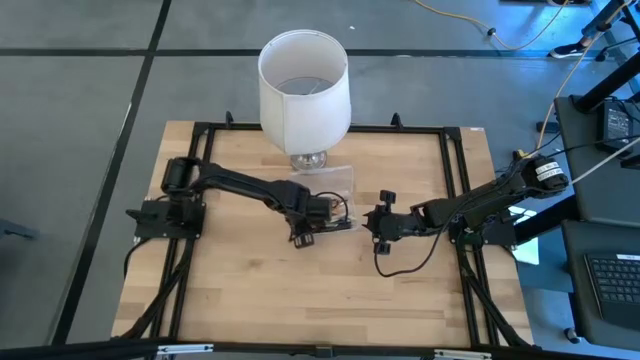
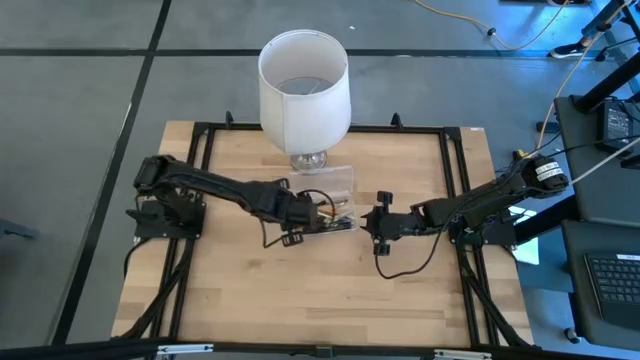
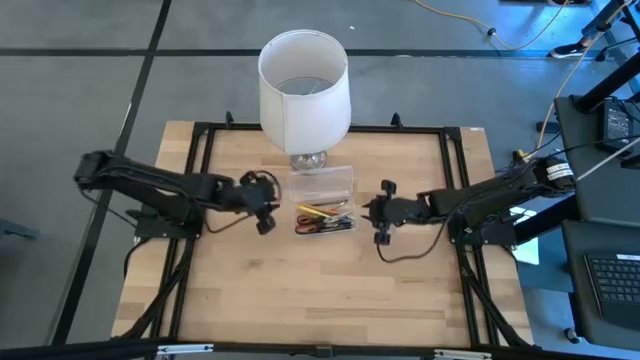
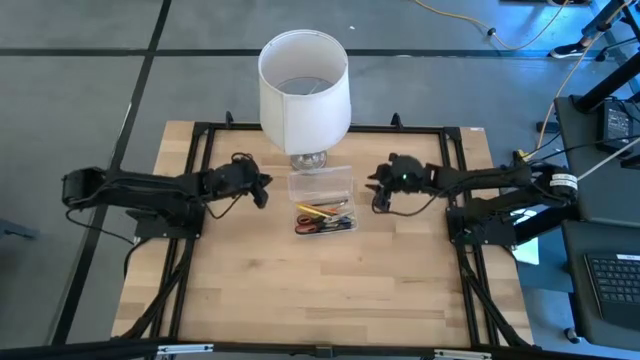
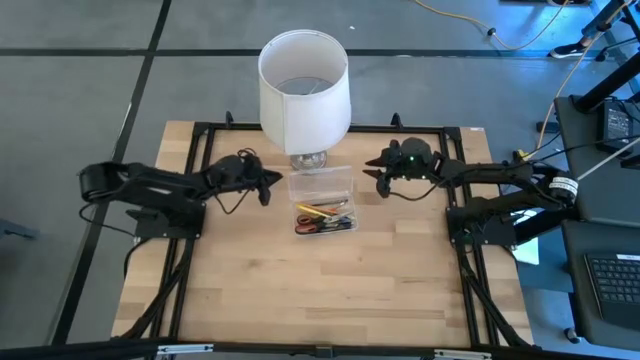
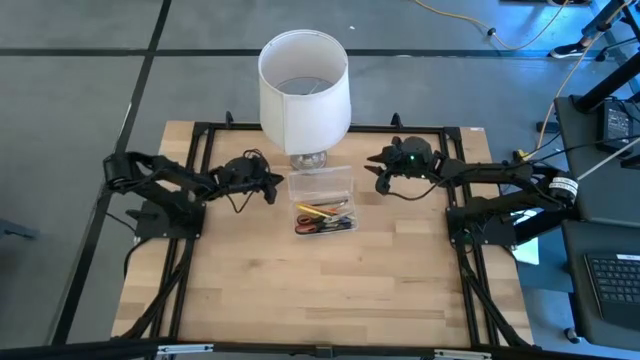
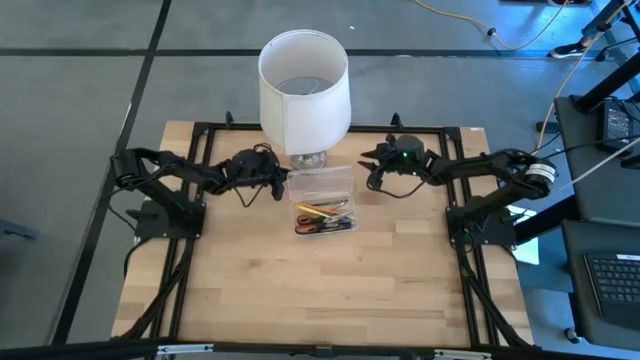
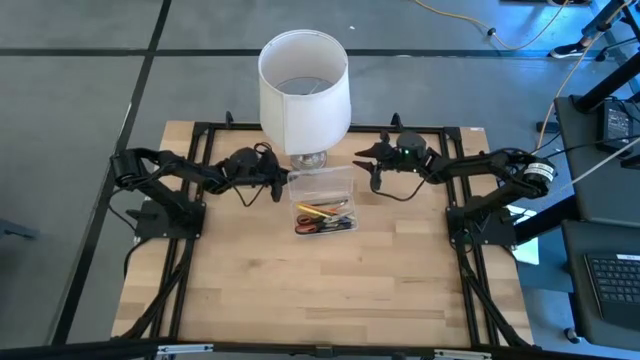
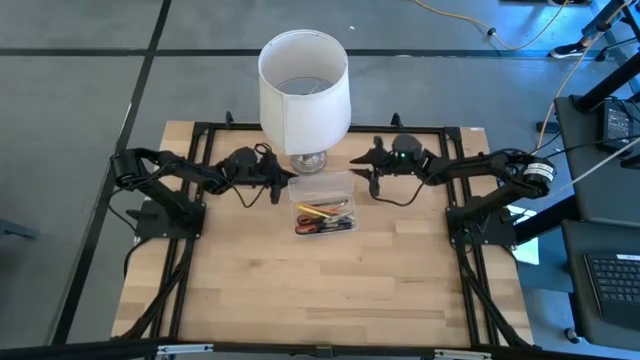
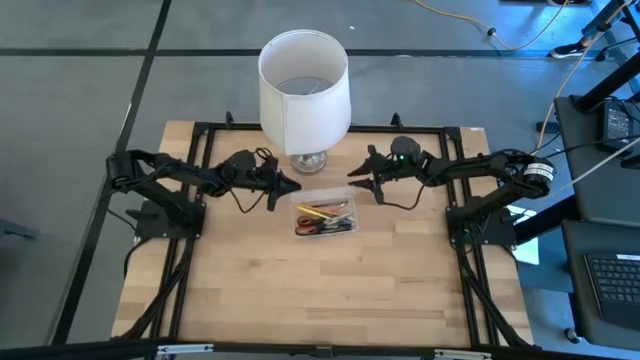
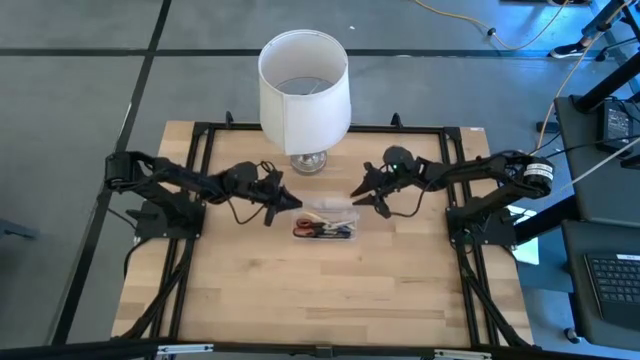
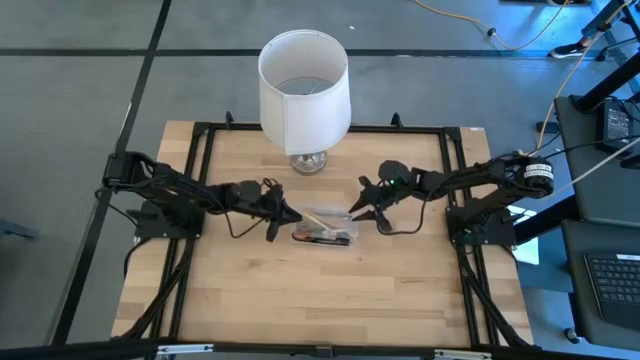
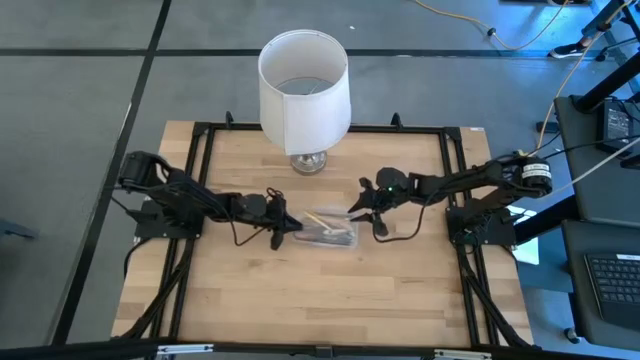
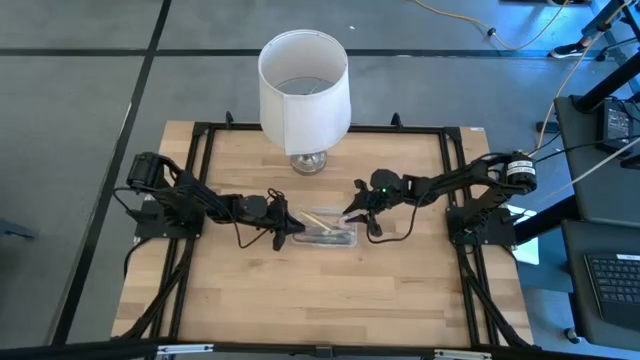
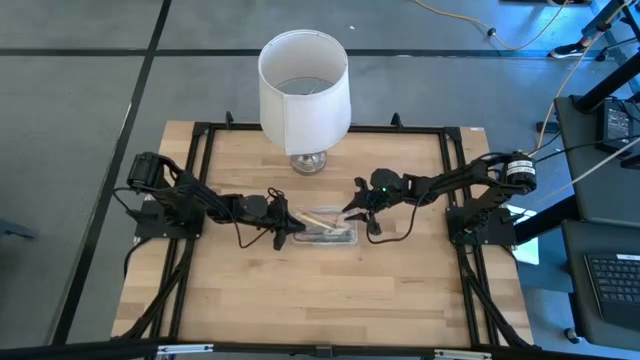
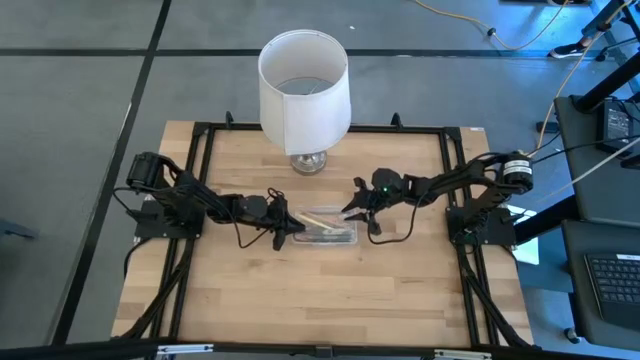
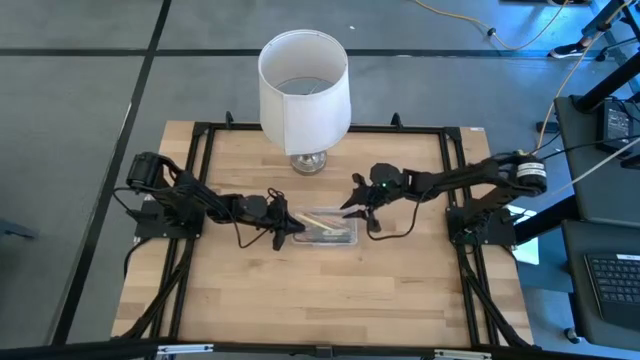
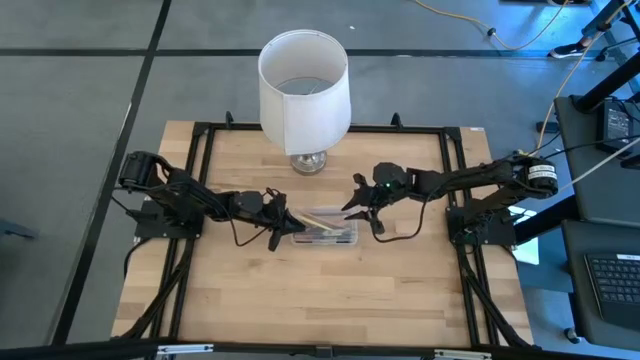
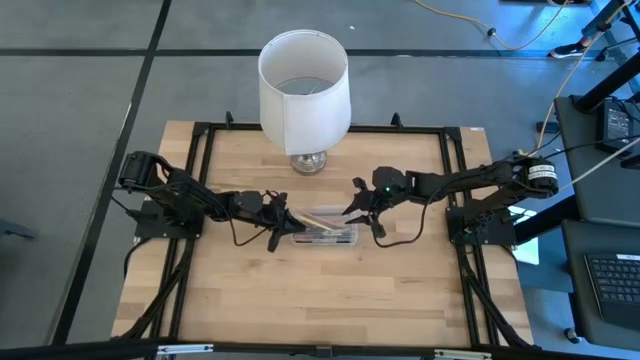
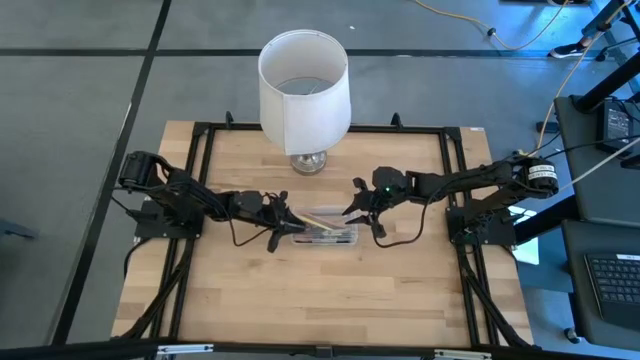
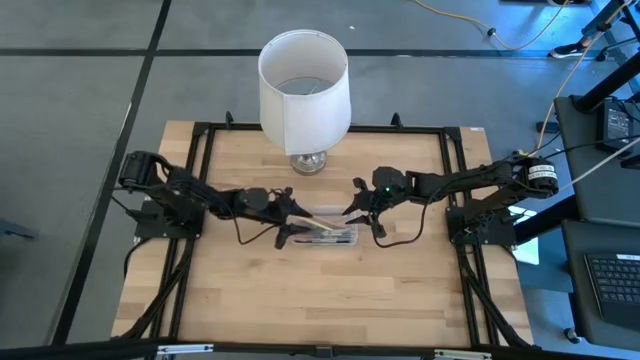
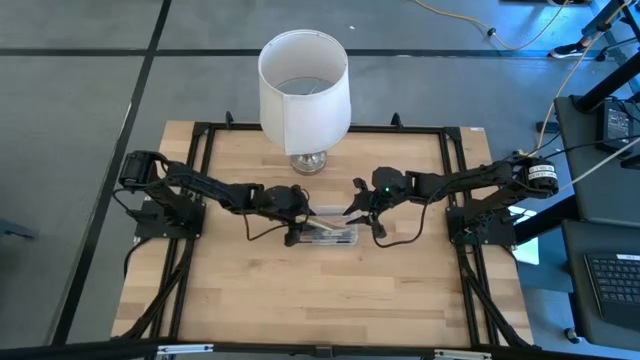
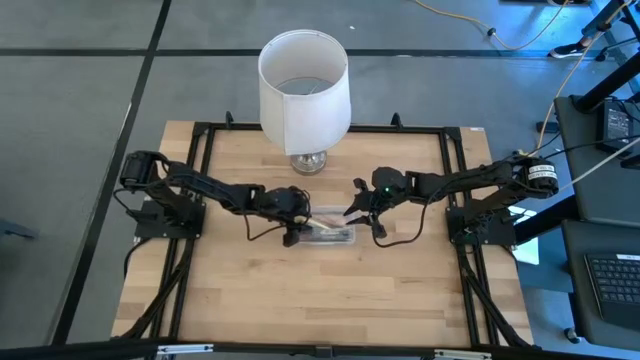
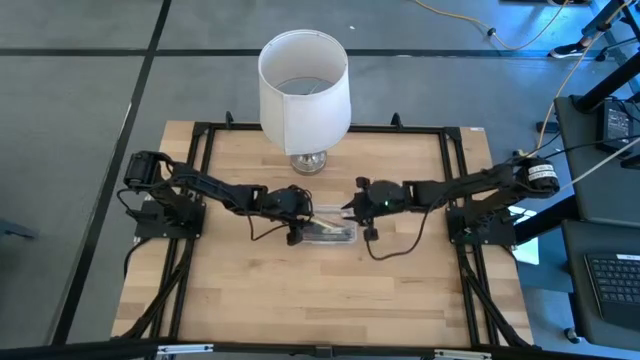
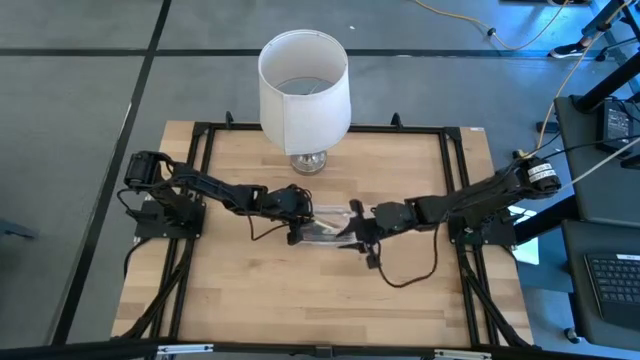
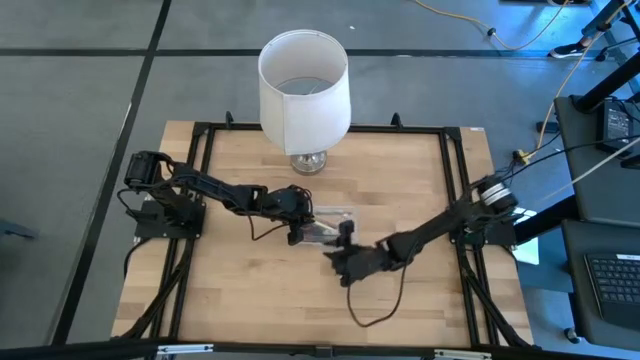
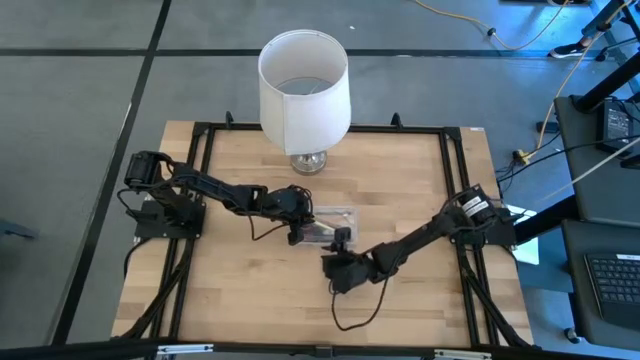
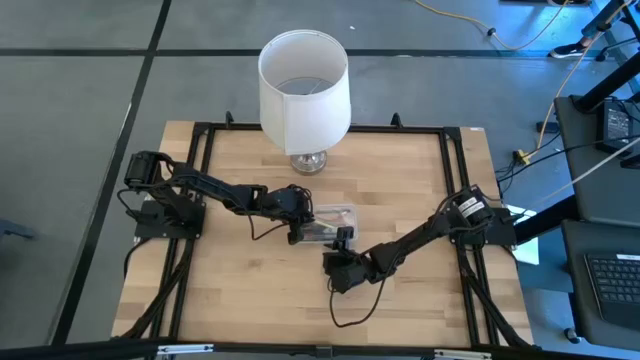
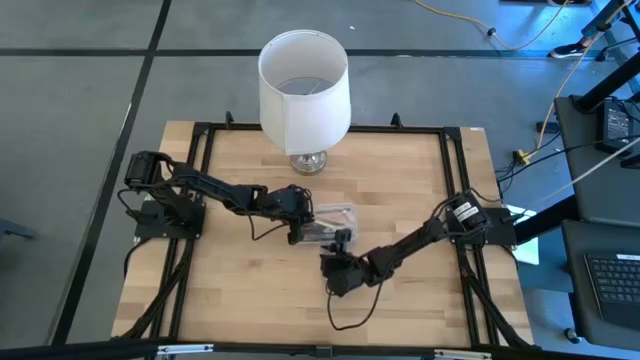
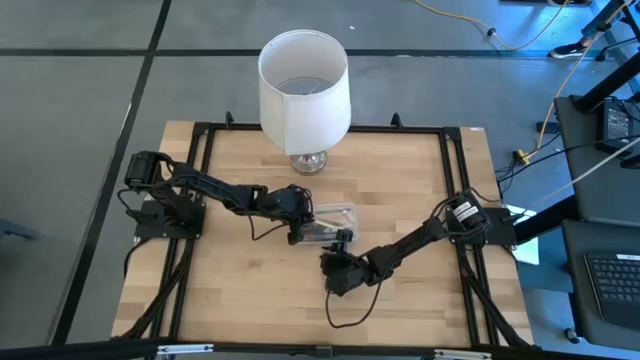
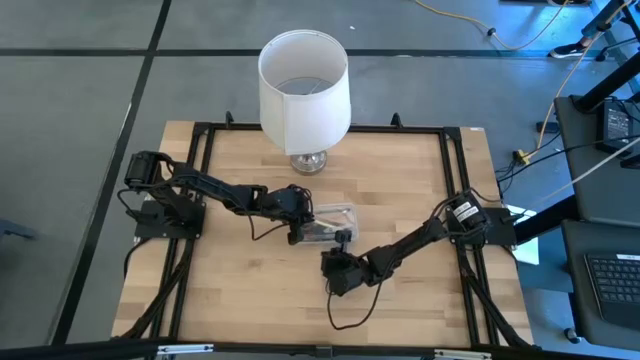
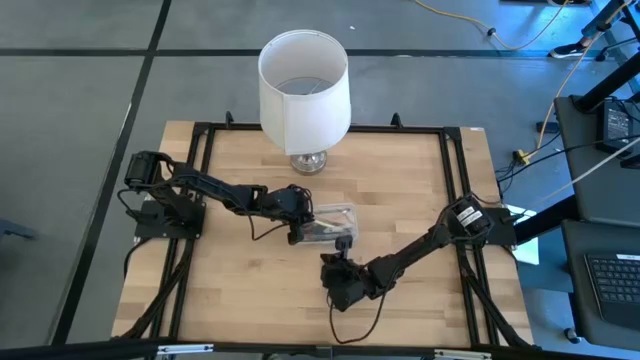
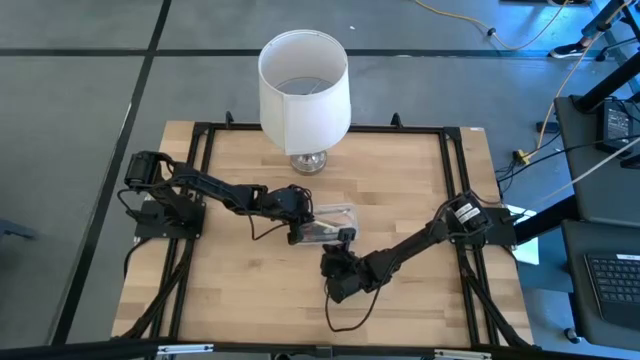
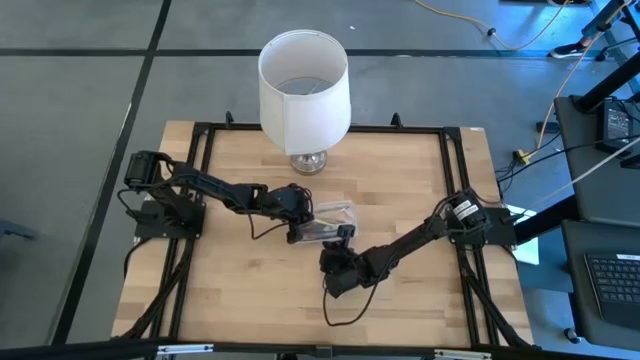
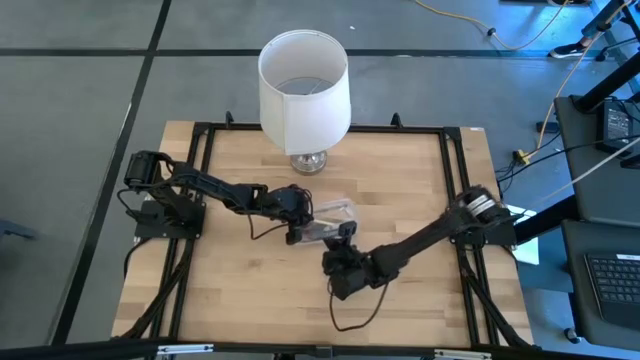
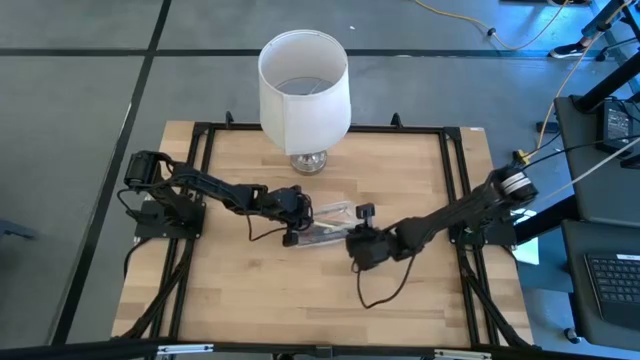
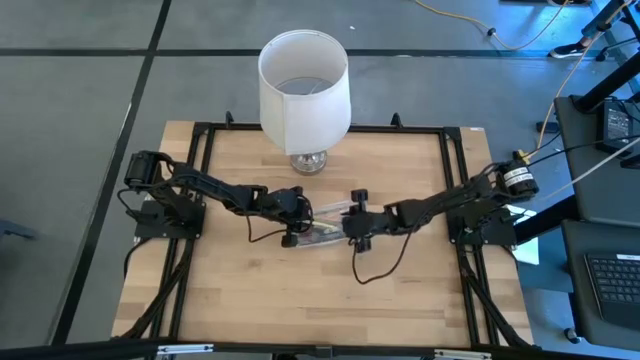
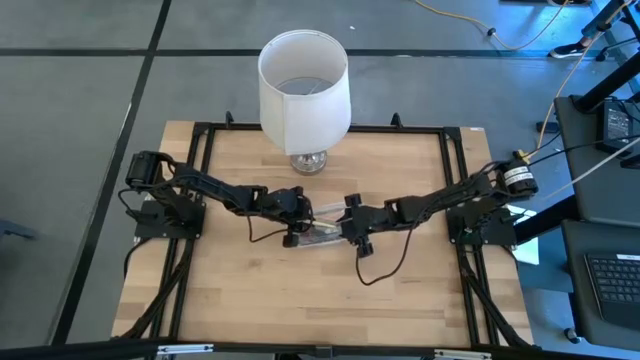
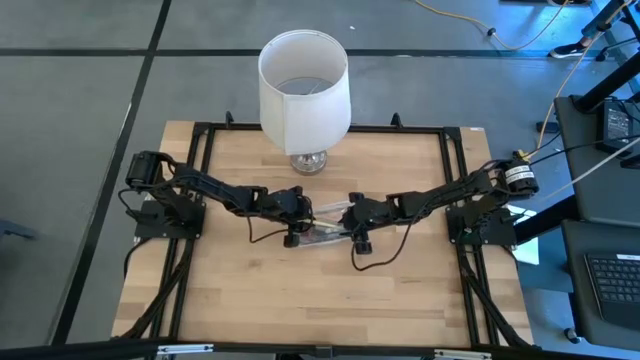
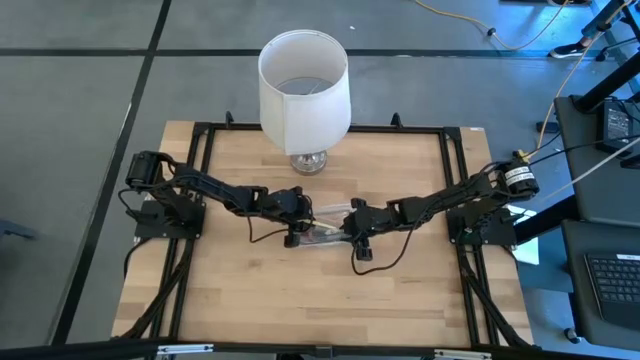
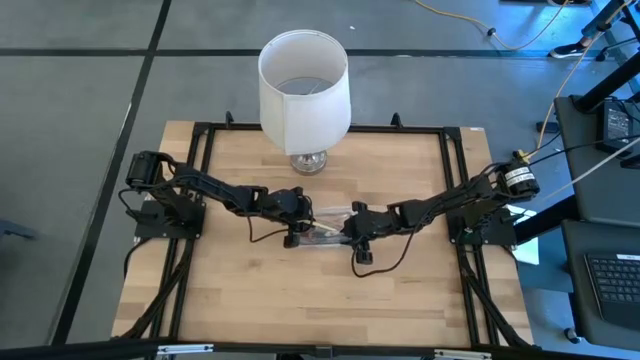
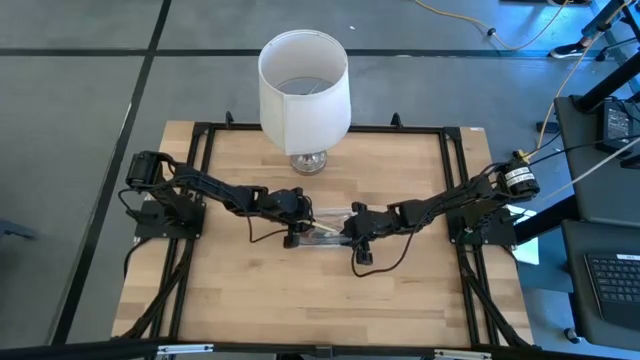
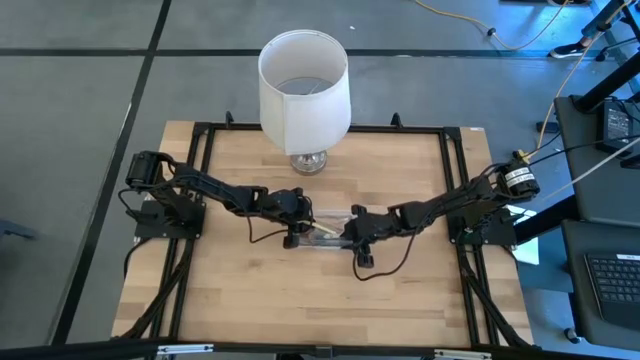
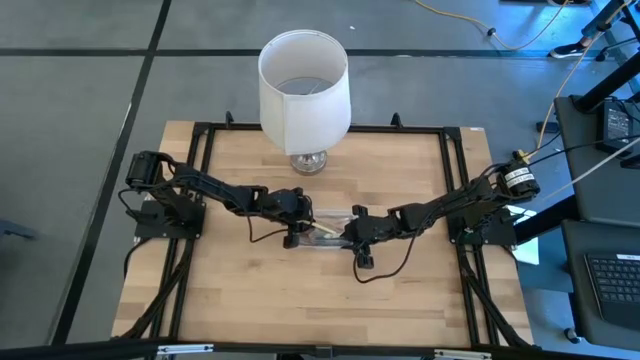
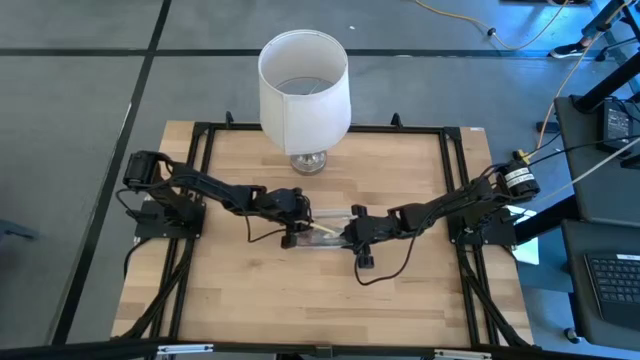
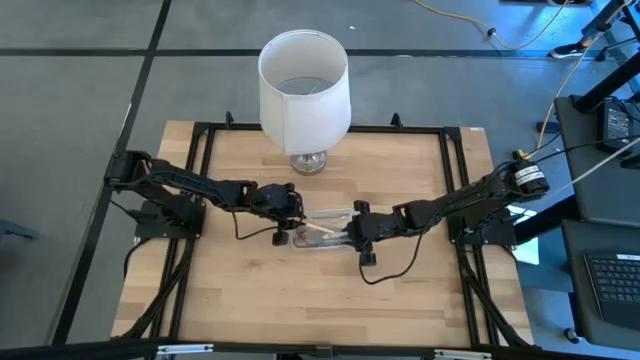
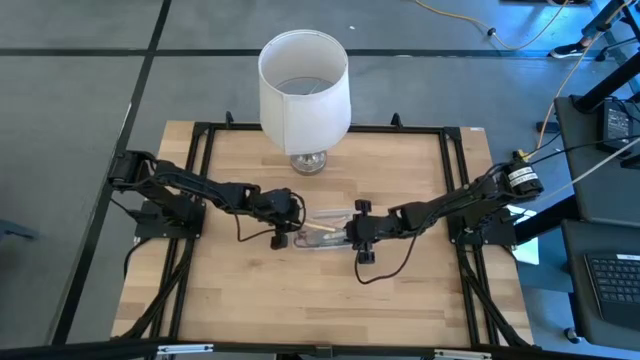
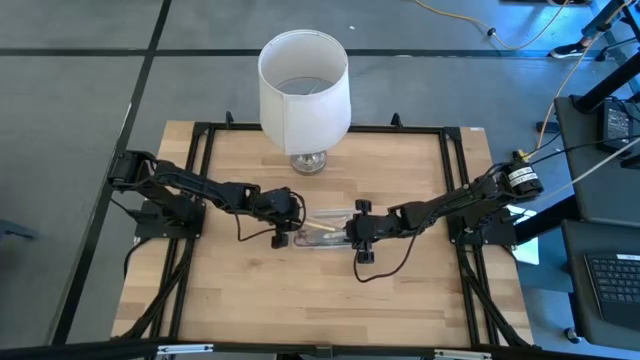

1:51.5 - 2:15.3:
Task: Pick & place school supplies into a supply box
Close the transparent supply box
